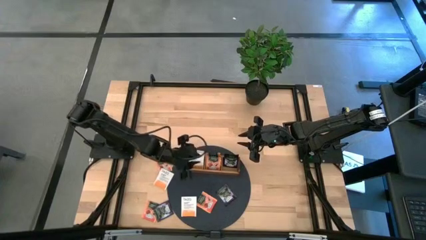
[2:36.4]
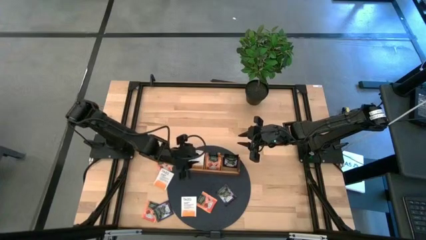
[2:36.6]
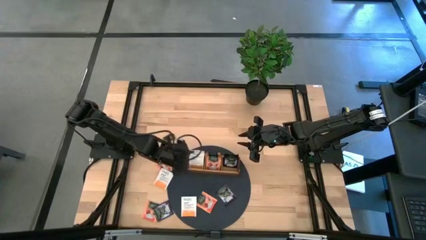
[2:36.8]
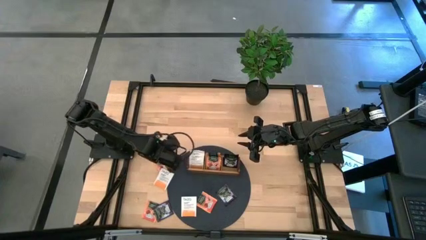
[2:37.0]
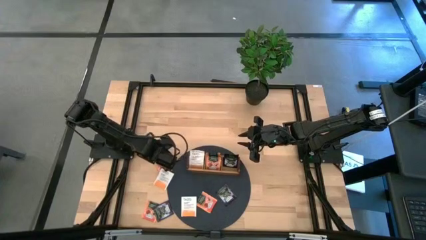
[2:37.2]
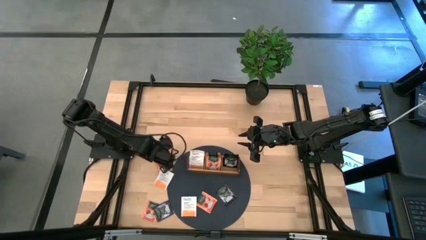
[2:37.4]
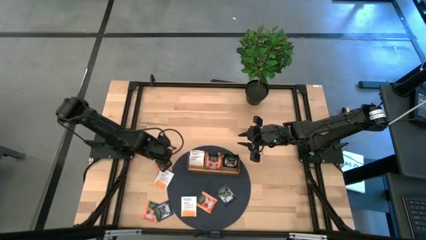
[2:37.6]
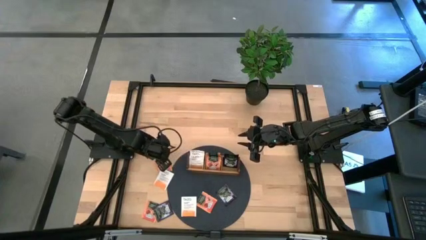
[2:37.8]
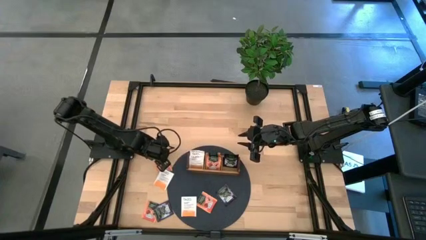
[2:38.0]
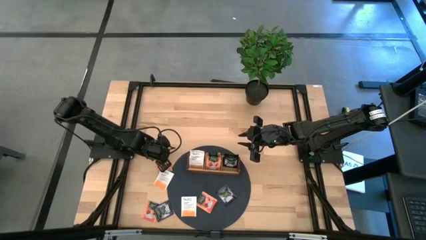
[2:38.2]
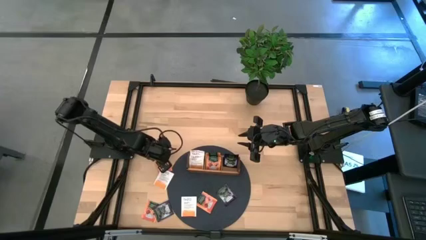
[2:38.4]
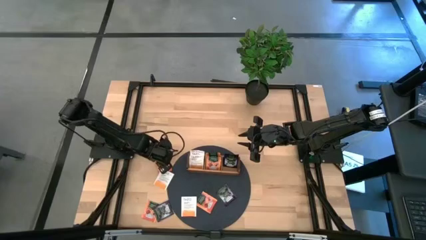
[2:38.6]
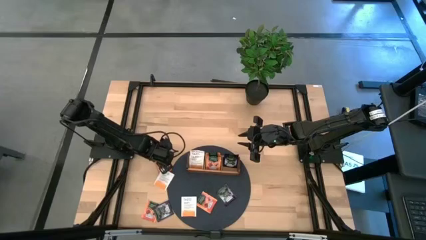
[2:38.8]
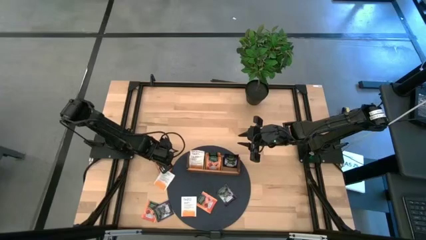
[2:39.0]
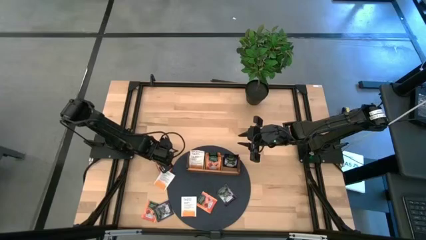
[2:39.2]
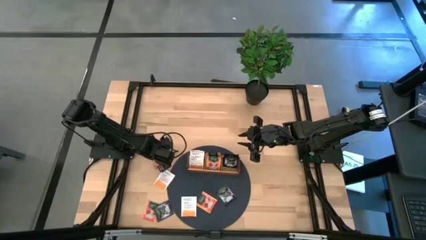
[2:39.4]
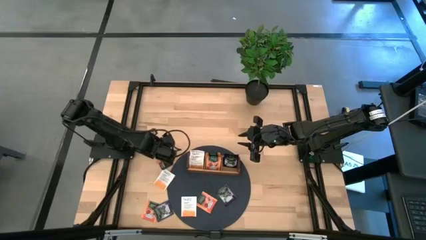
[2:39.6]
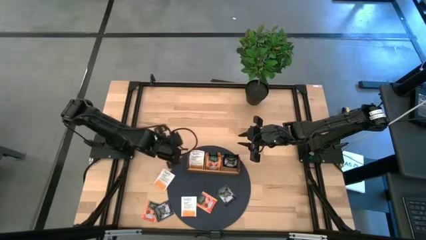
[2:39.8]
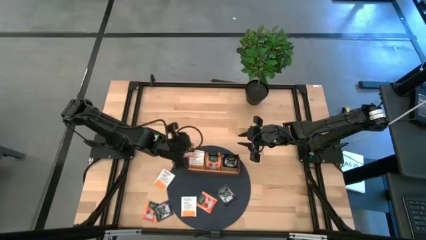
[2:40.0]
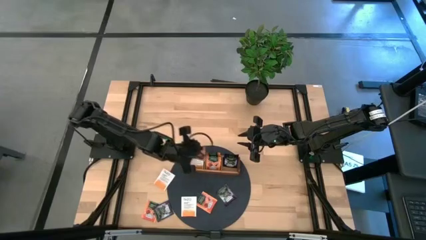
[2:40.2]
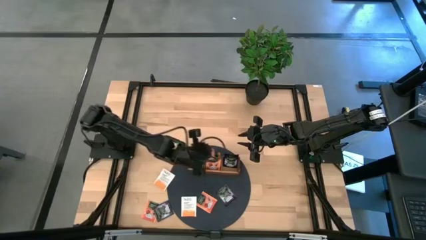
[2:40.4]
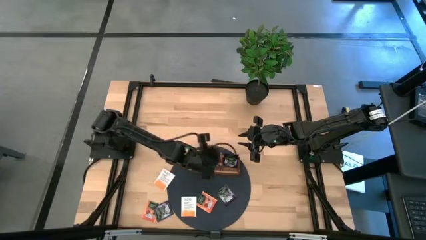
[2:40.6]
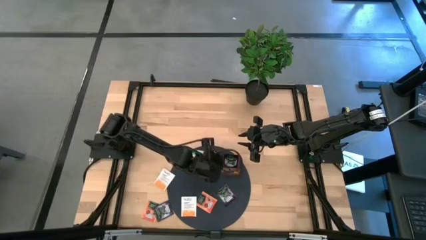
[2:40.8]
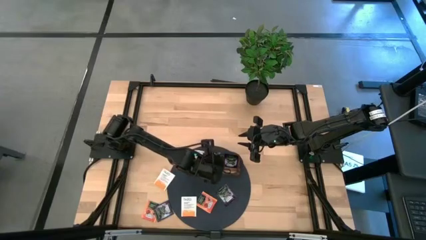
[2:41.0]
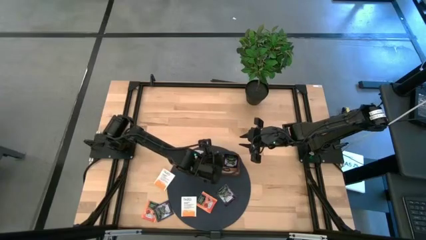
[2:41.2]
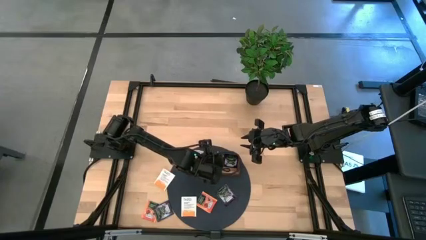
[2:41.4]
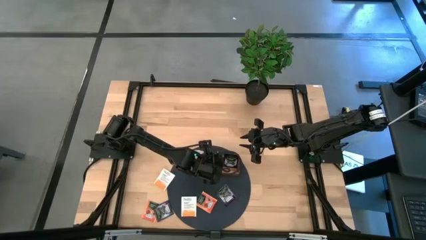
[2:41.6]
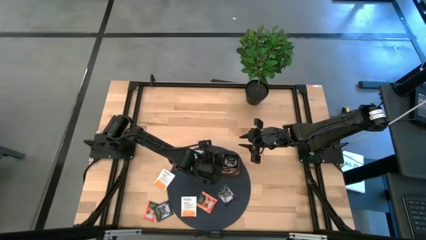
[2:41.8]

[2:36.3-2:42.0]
Task: Pick & Place Tea
Put the orange black tea bag into the middle section of the wooden organizer

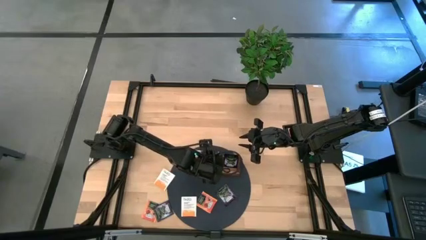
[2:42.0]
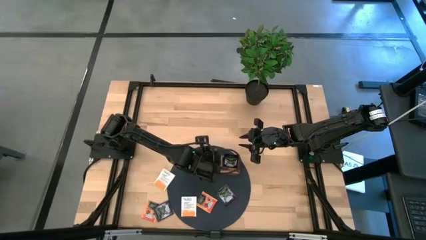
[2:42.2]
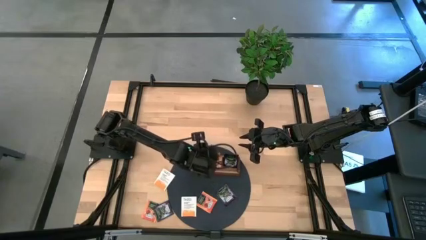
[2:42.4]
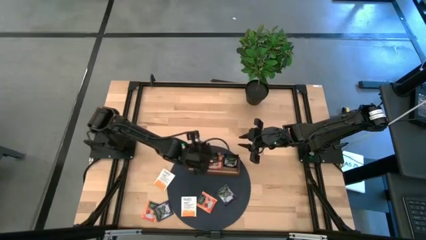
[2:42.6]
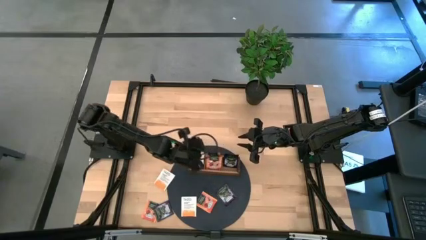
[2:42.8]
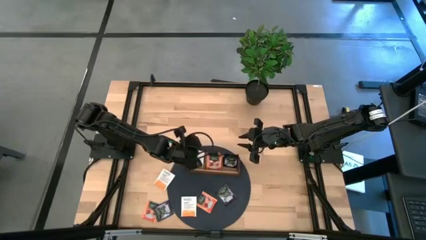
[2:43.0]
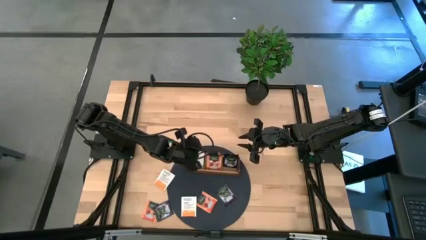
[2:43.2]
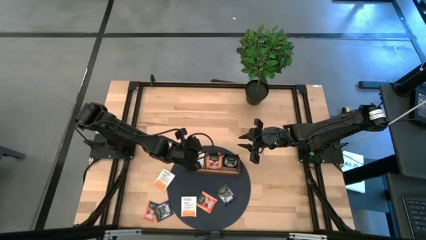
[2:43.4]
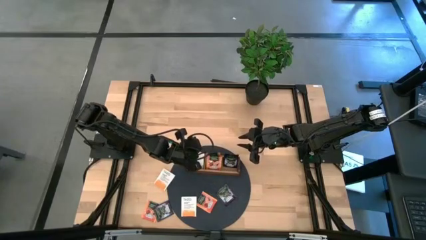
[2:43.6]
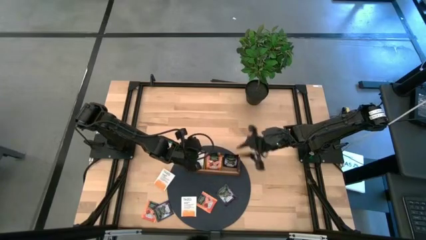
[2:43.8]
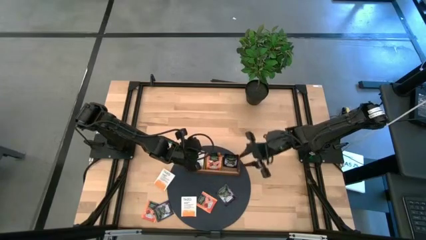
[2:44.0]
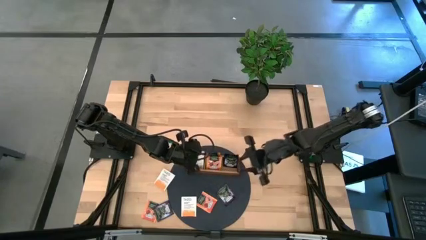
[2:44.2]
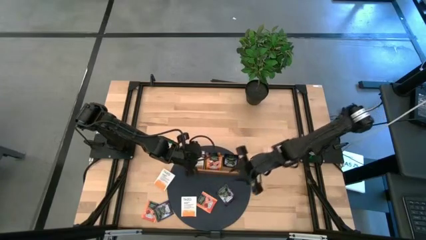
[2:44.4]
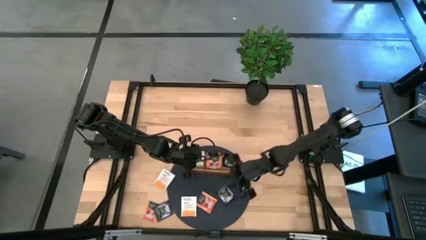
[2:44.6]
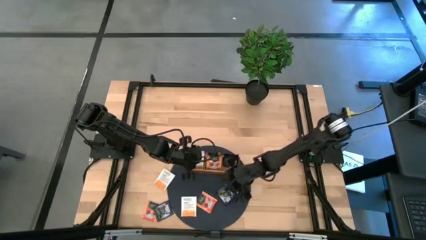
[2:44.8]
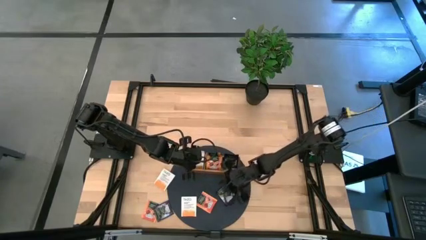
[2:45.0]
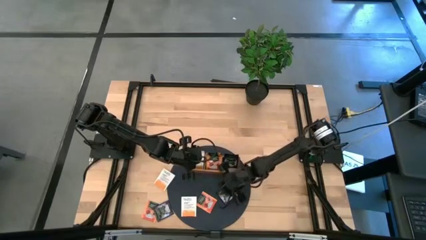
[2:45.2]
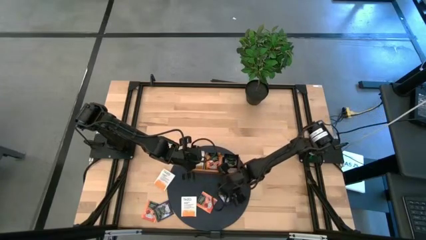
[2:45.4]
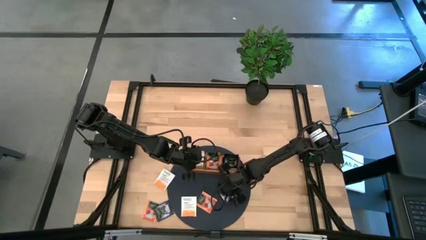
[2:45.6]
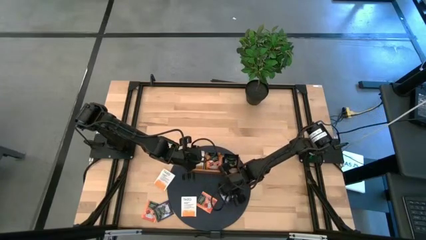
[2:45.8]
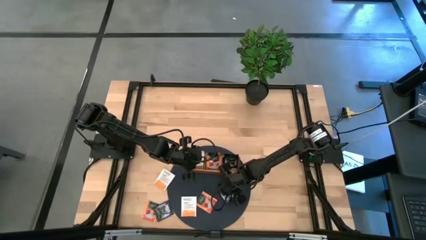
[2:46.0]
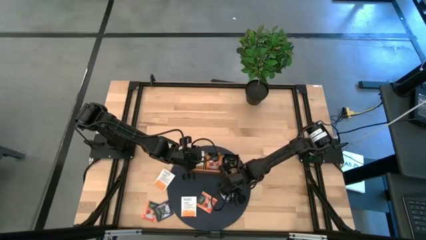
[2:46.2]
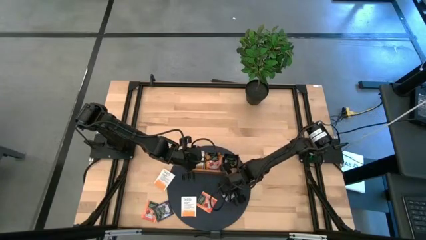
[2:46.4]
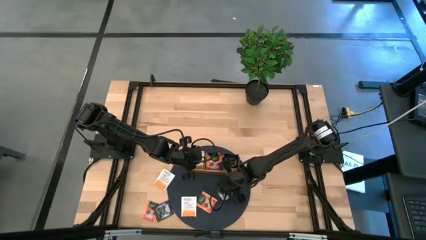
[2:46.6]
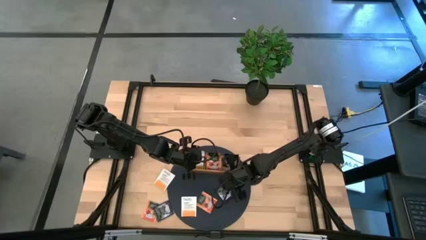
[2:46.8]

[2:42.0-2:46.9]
Put the black white tea bag into the right section of the wooden organizer

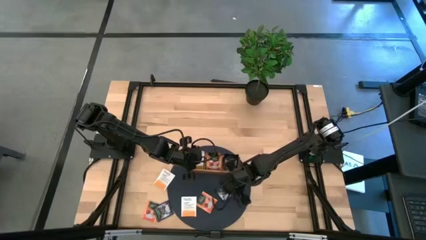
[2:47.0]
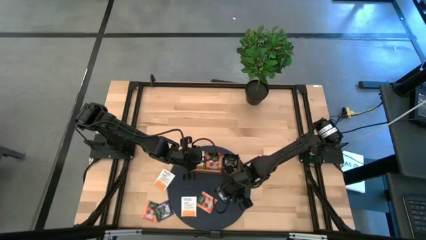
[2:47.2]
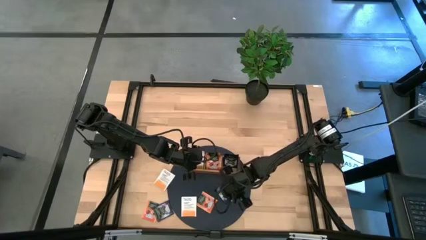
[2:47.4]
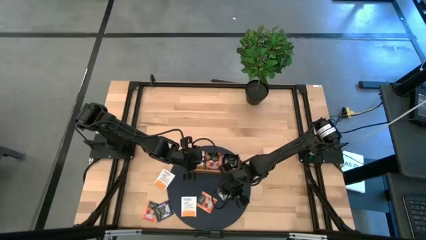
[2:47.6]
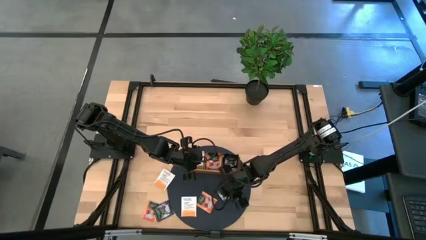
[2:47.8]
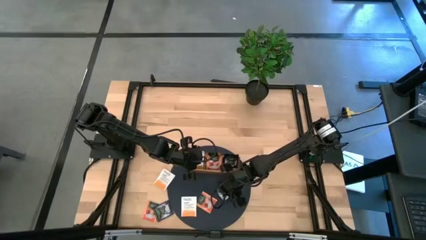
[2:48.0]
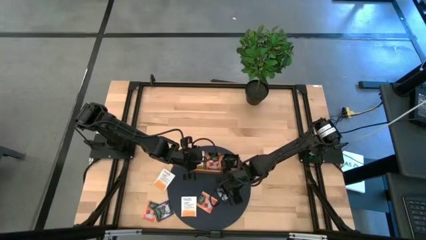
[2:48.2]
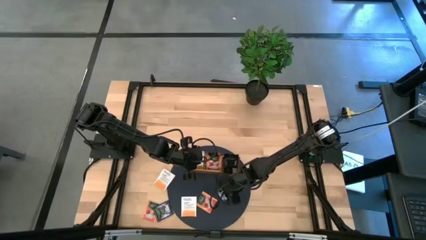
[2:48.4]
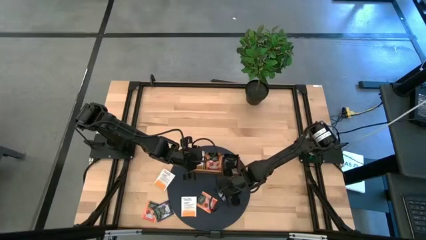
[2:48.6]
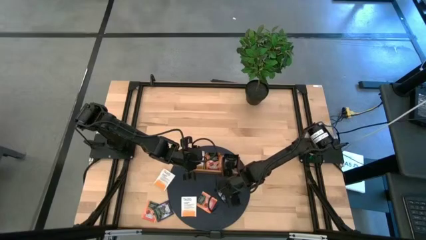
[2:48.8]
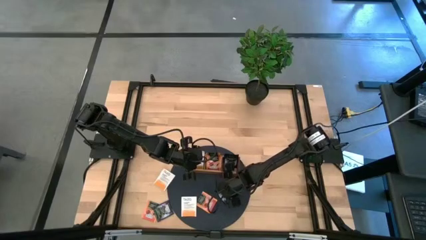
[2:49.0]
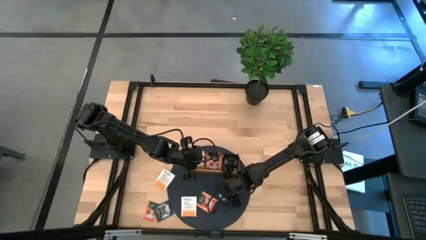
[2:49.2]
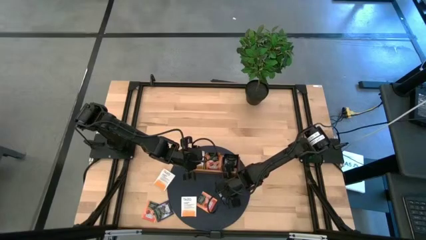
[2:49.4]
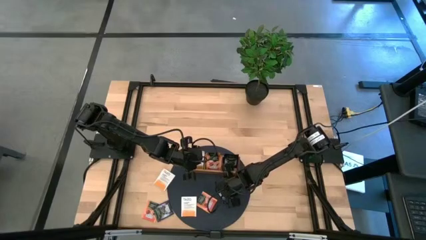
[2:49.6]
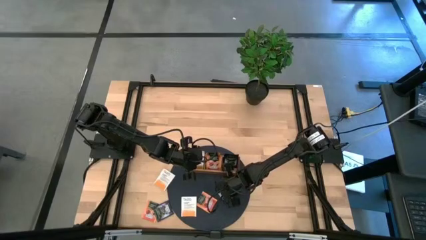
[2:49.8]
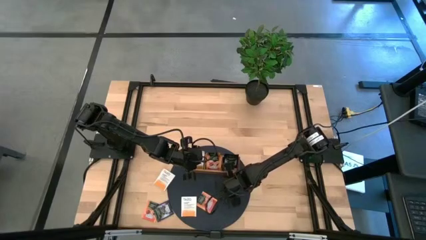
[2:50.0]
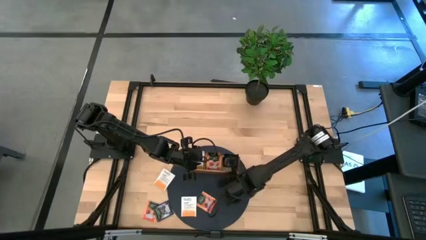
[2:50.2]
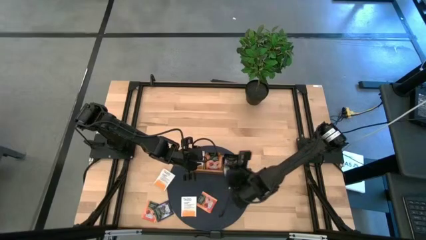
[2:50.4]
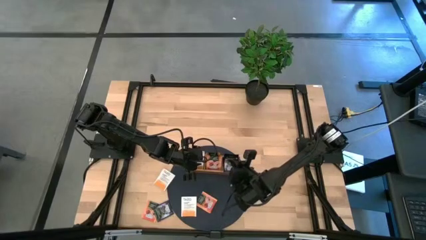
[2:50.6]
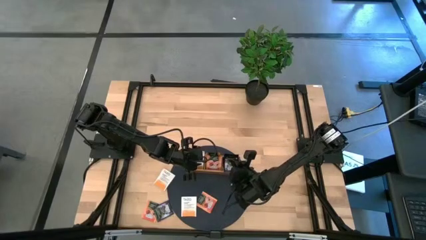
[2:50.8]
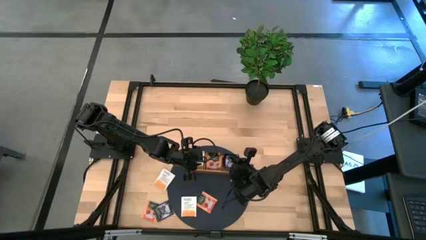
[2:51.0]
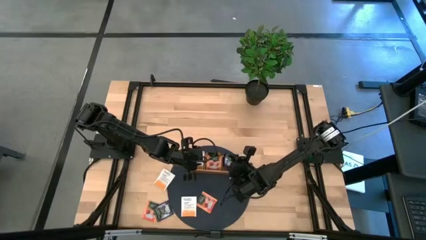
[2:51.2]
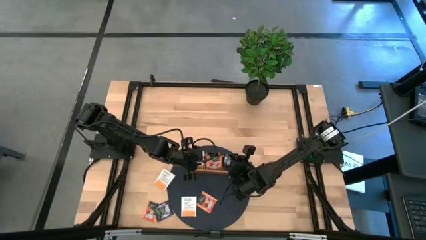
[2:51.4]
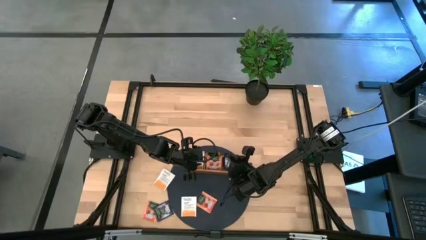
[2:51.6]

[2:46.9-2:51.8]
Put the black white tea bag into the right section of the wooden organizer

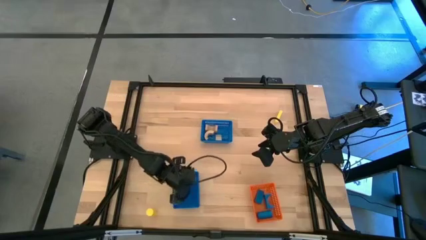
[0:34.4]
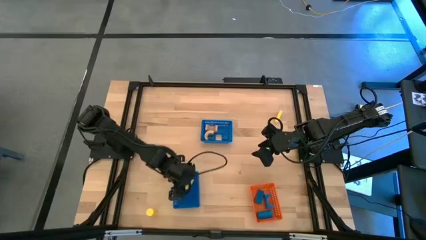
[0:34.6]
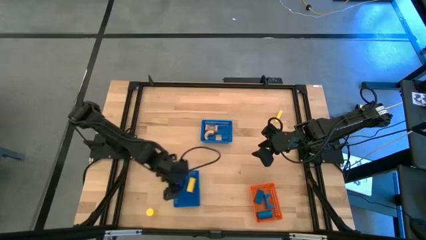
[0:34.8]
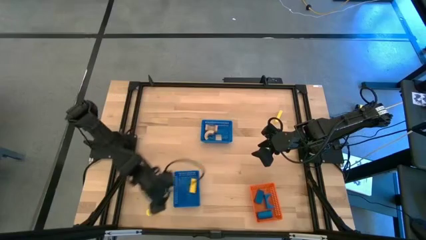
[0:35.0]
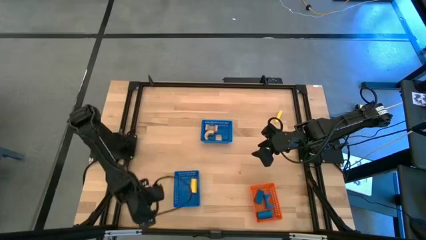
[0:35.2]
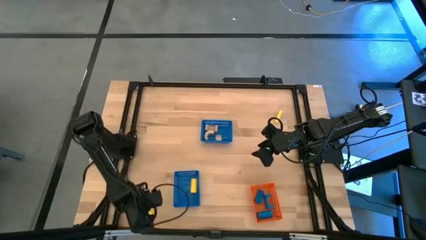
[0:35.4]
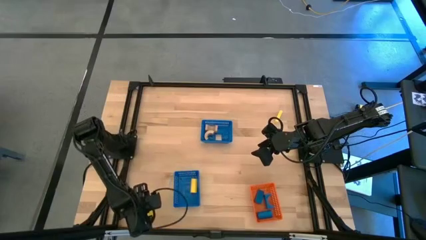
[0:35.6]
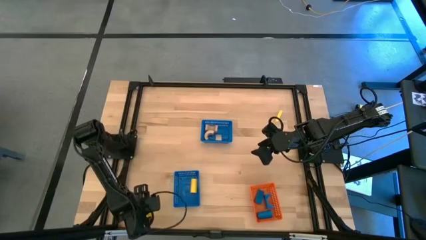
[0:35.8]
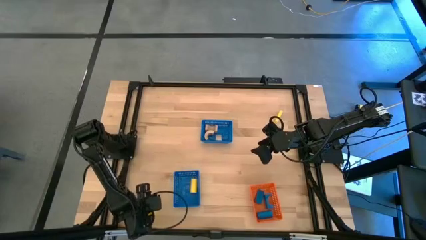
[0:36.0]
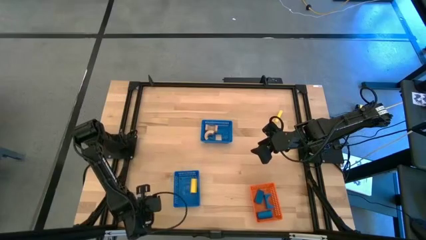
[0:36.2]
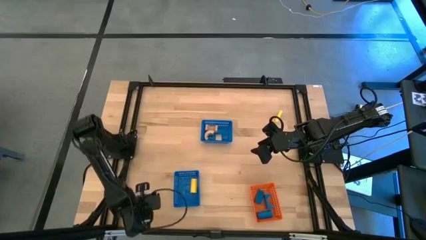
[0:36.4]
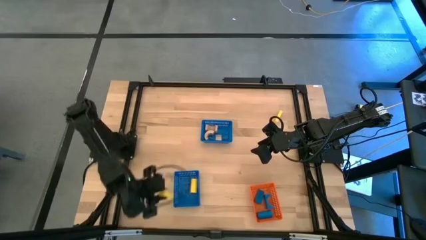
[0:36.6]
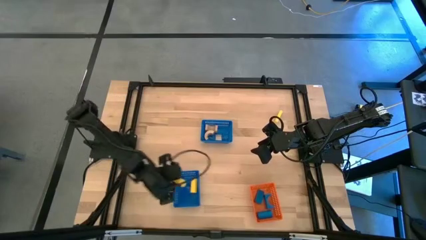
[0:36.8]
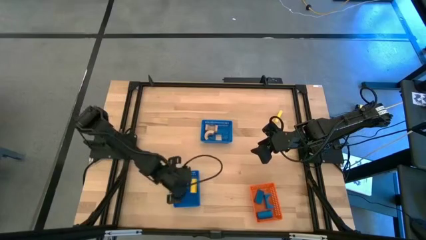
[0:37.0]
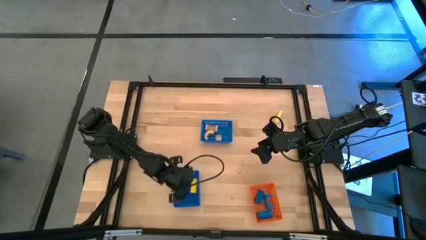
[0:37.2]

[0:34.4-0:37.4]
Task: Sort & place blocks by color
Put the bottom yellow block into the bottom blue basket
